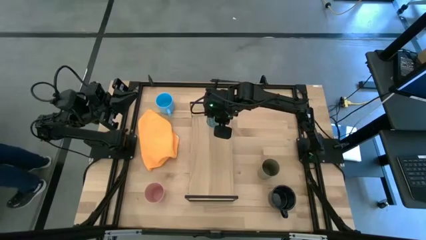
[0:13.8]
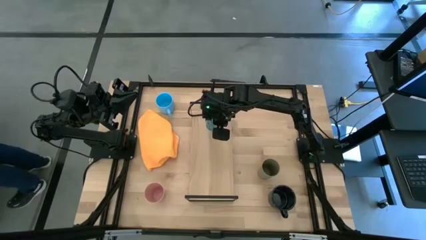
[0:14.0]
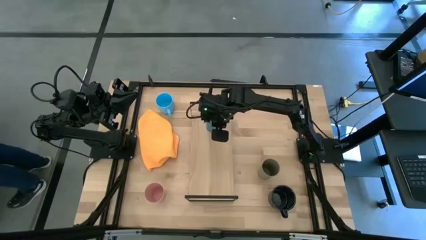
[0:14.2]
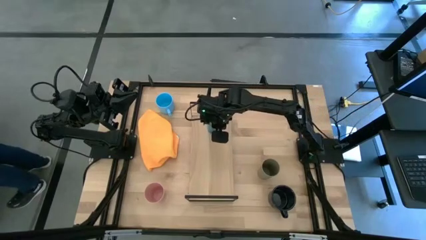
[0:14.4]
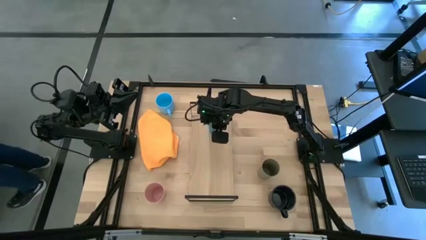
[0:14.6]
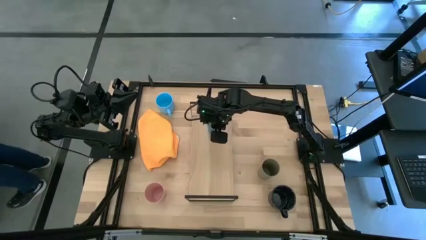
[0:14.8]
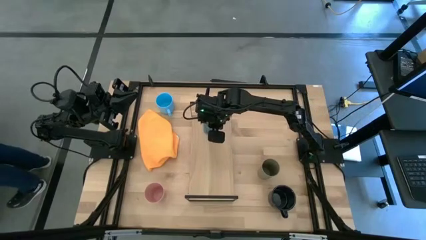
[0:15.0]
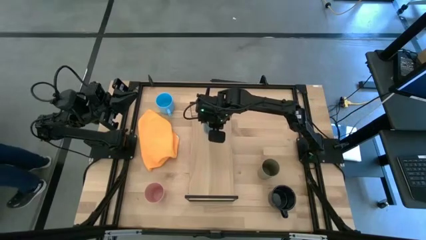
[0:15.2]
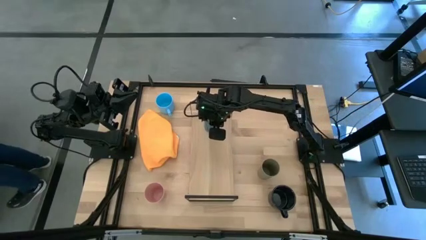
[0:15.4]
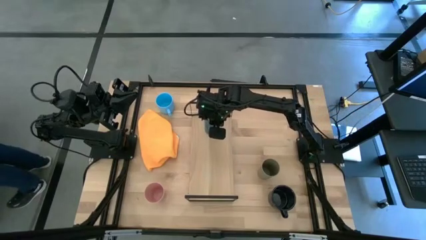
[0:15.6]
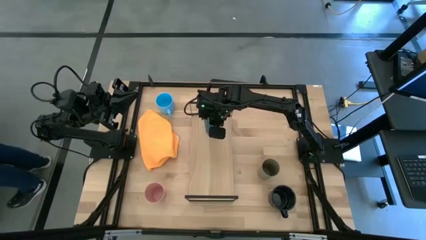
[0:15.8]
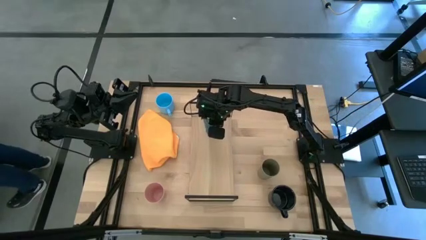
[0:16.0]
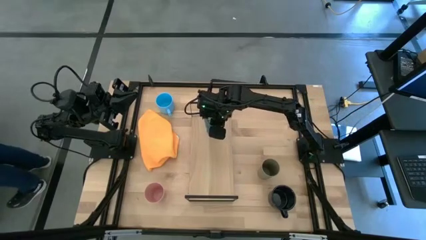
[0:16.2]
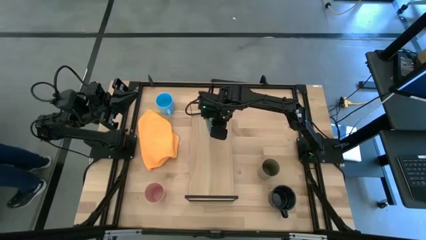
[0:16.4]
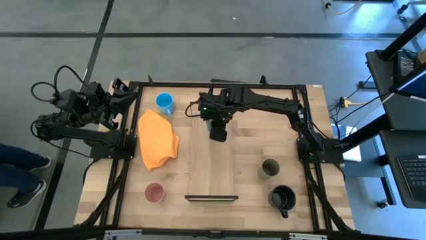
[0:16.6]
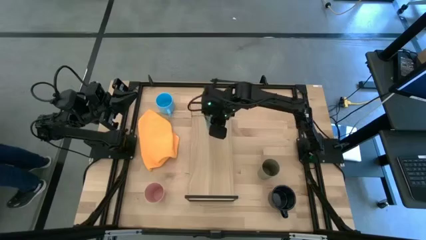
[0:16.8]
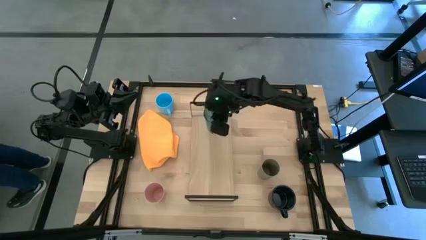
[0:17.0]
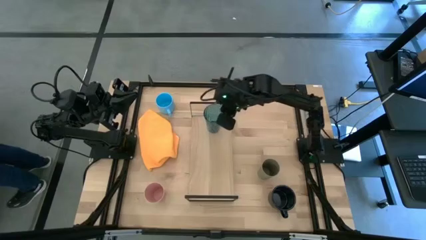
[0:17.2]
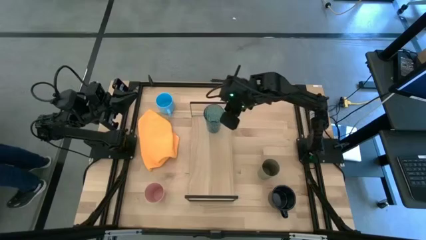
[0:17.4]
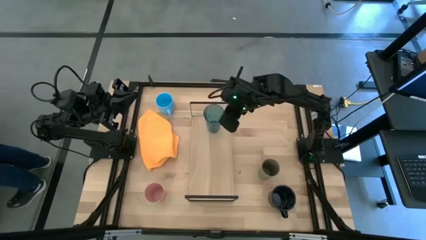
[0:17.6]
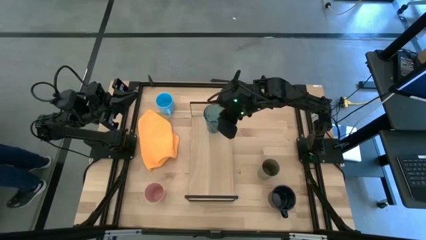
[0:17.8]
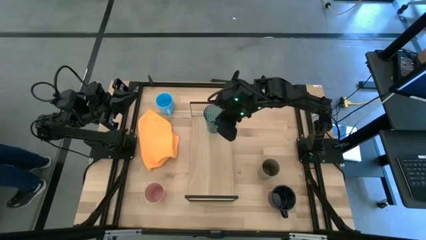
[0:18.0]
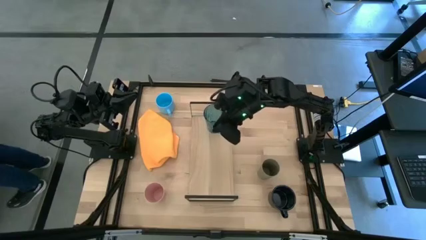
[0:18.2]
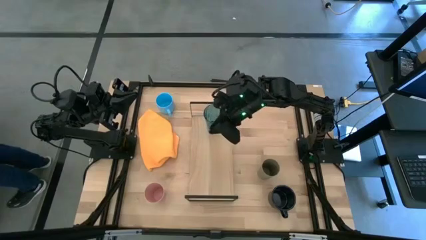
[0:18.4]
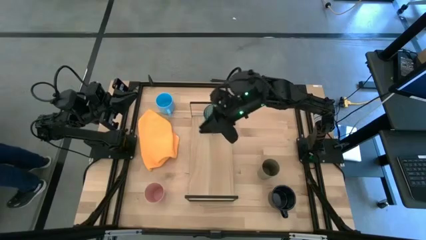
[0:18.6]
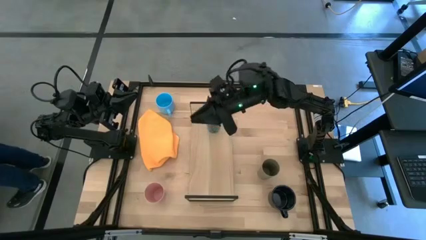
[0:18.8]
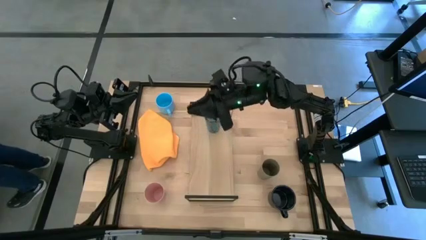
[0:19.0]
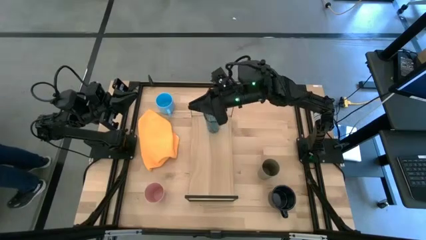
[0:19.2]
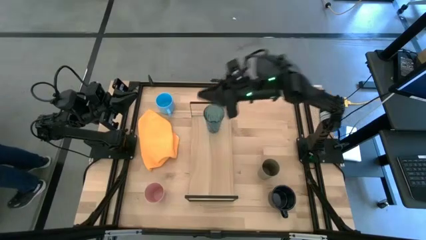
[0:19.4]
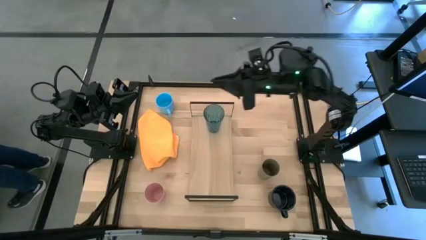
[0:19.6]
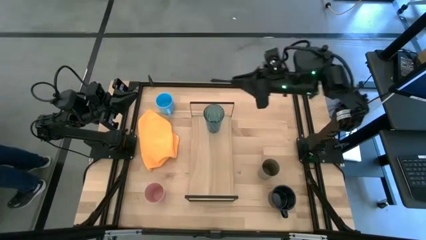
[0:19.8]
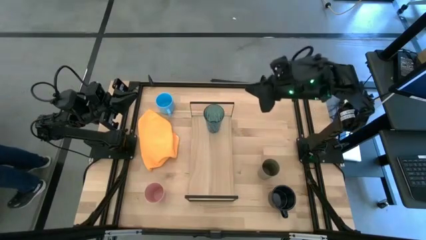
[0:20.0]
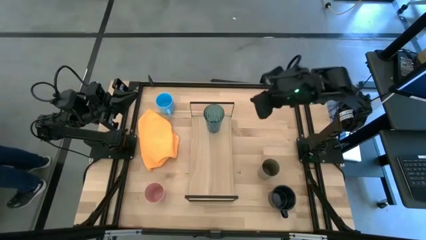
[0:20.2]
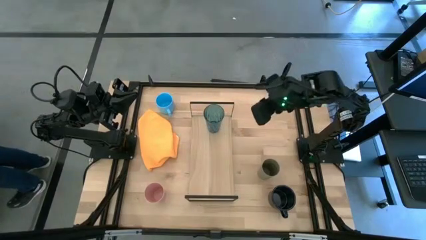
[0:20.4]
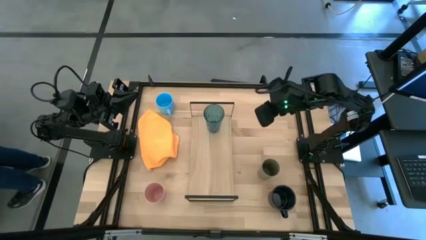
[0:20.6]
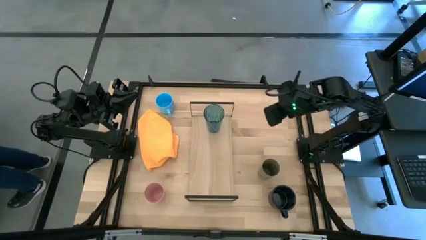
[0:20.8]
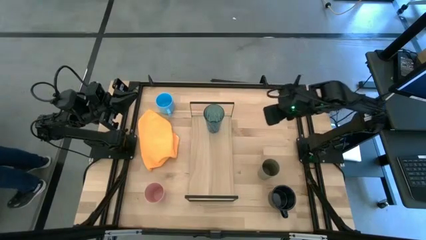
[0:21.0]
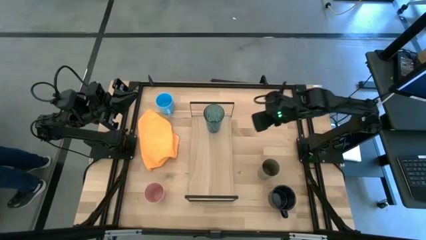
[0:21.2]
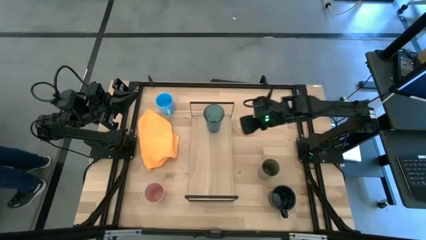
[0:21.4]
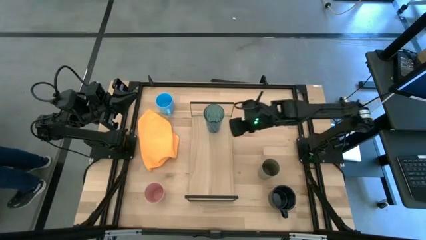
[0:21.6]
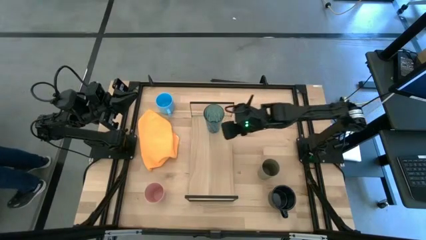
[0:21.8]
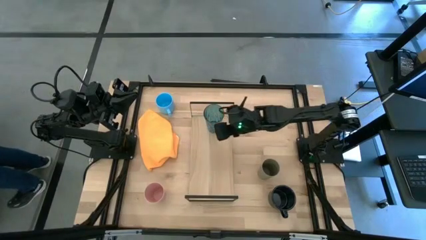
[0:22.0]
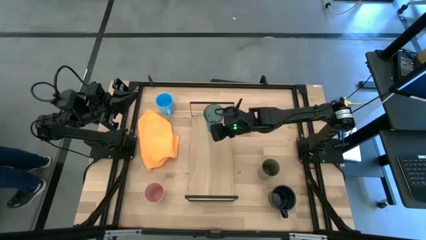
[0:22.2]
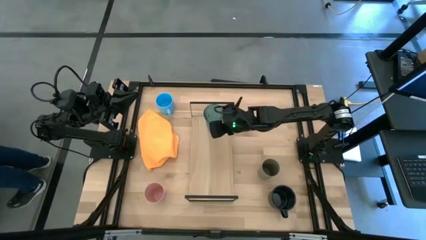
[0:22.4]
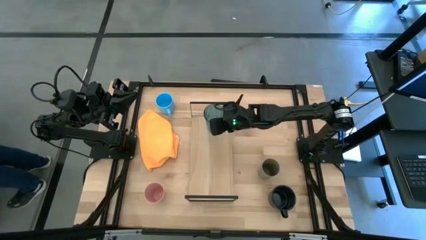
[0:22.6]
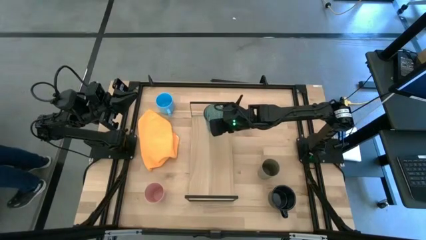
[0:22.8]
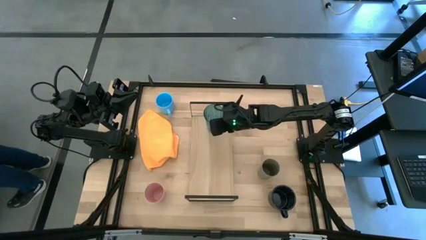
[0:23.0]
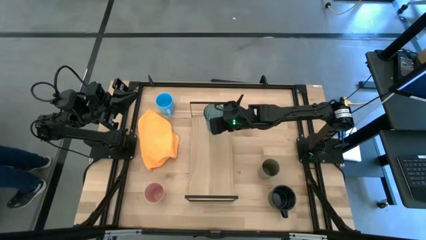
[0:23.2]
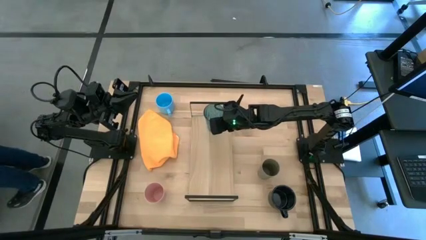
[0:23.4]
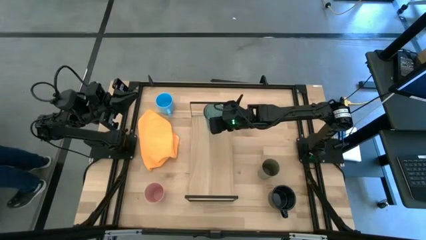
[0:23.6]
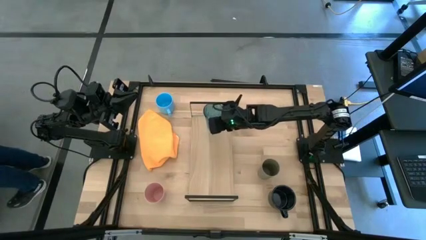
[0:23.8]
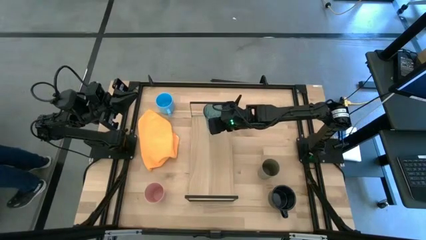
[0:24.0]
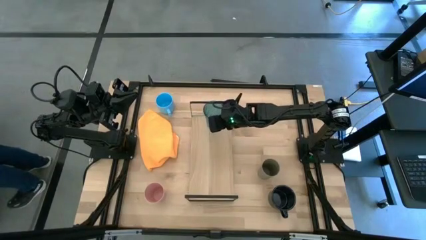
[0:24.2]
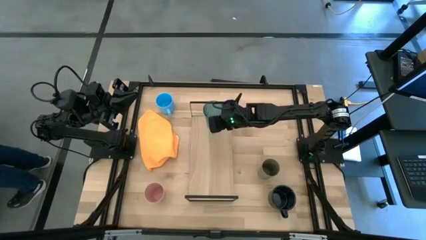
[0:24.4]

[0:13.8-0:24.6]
Task: Stack small to large cups/mugs on shelf
Put the blue cup on the shelf

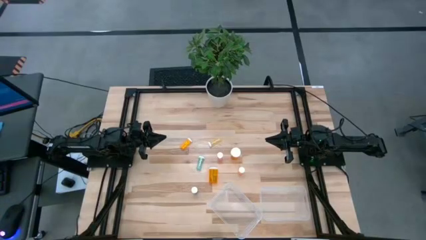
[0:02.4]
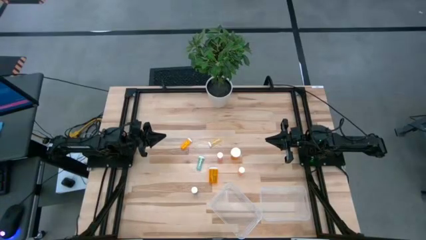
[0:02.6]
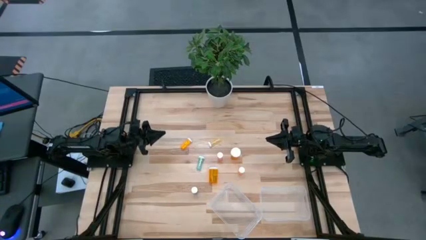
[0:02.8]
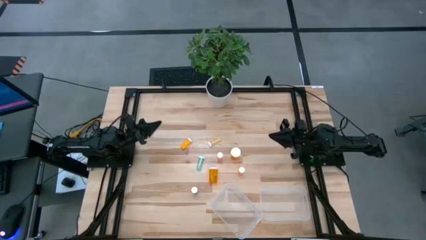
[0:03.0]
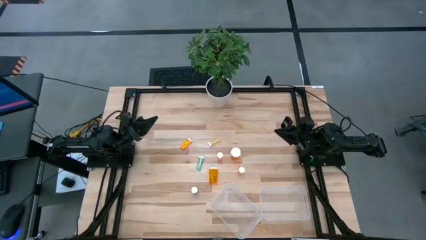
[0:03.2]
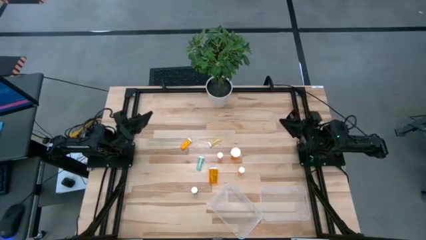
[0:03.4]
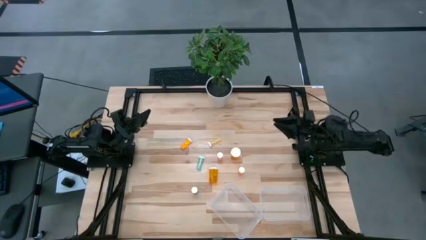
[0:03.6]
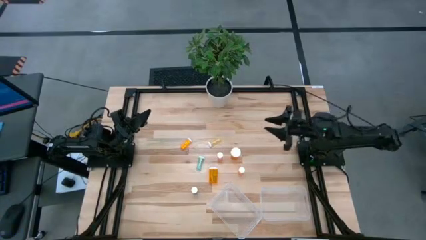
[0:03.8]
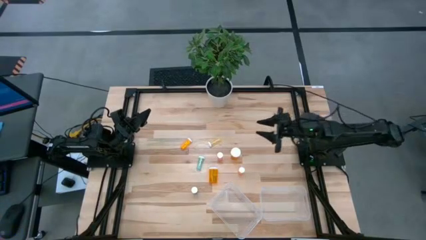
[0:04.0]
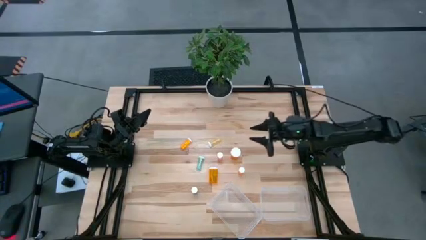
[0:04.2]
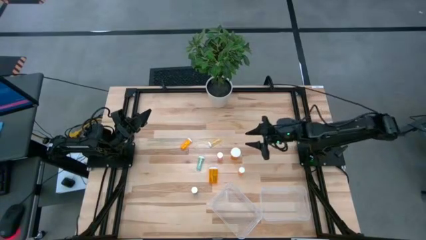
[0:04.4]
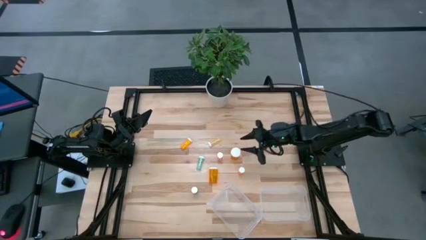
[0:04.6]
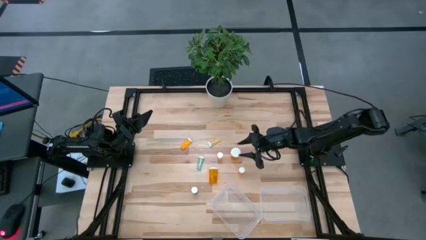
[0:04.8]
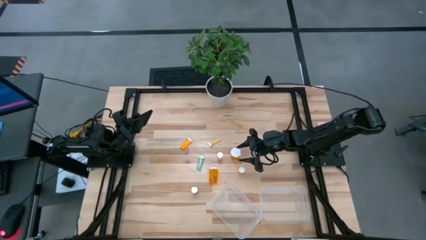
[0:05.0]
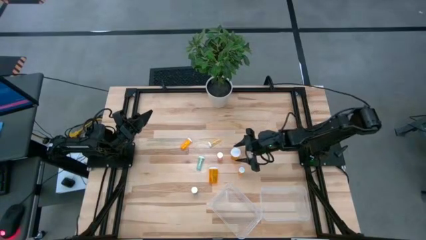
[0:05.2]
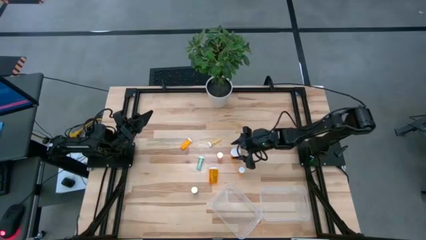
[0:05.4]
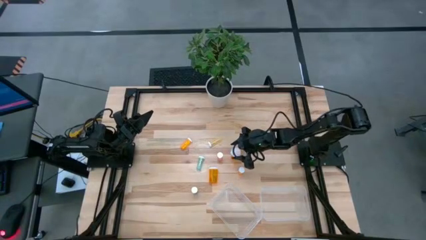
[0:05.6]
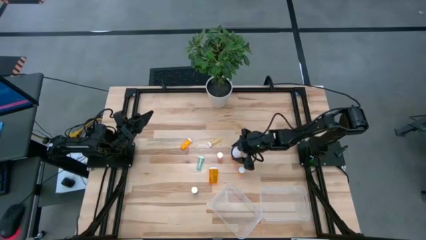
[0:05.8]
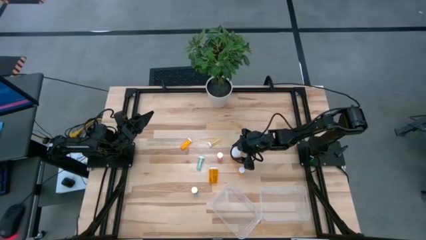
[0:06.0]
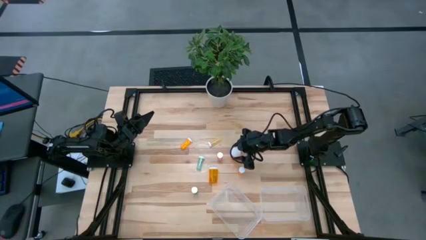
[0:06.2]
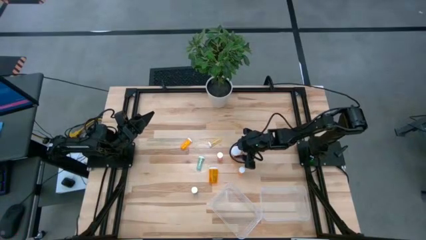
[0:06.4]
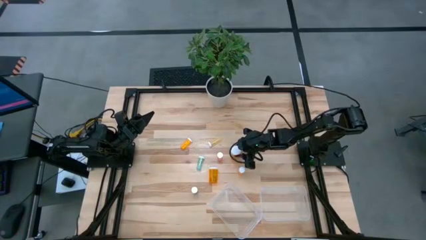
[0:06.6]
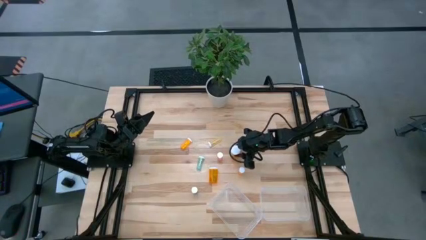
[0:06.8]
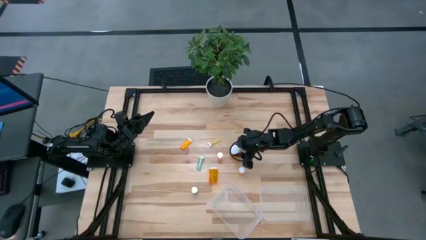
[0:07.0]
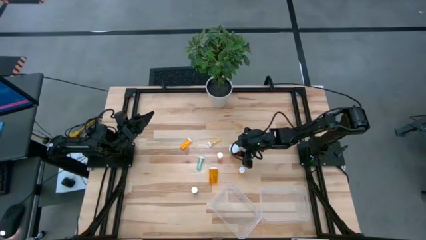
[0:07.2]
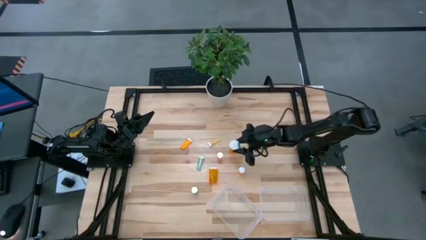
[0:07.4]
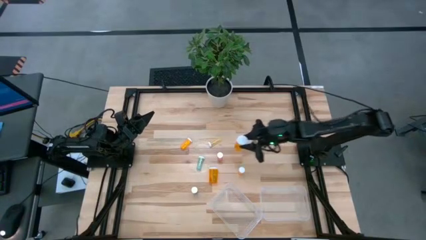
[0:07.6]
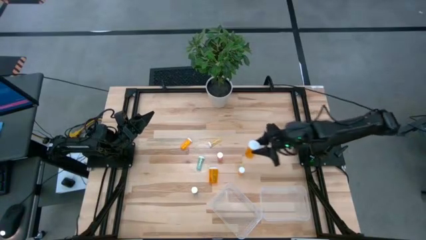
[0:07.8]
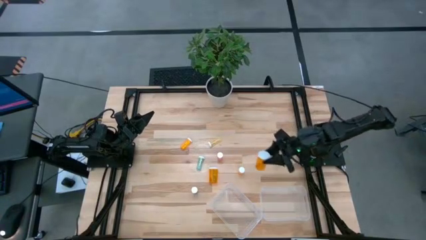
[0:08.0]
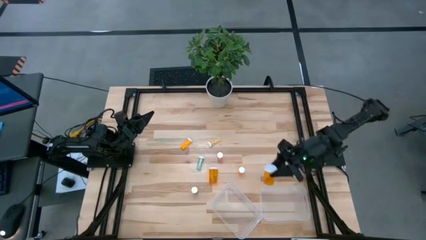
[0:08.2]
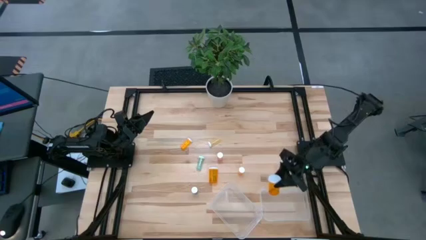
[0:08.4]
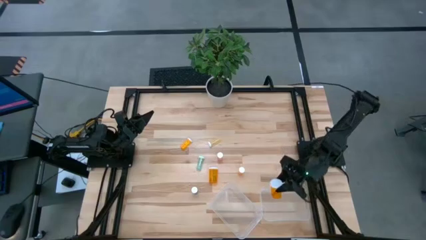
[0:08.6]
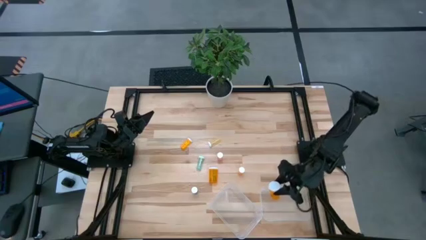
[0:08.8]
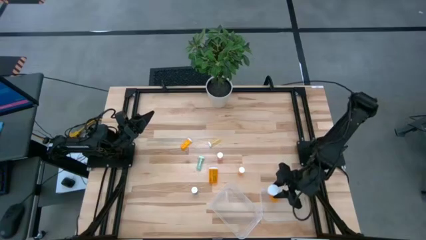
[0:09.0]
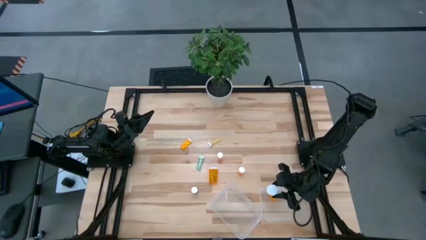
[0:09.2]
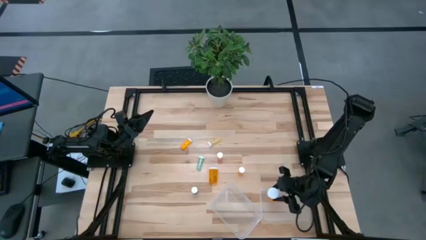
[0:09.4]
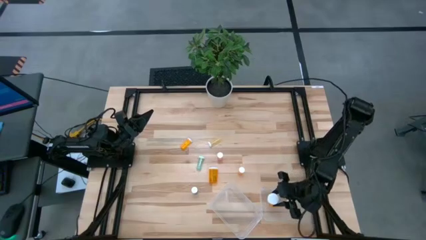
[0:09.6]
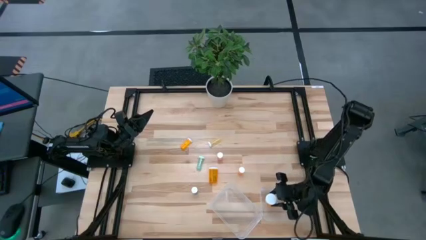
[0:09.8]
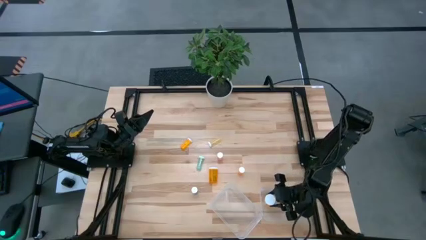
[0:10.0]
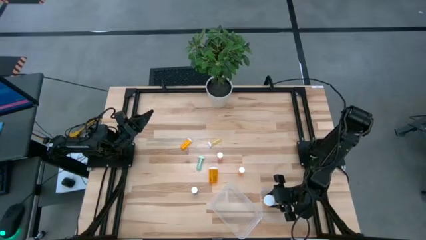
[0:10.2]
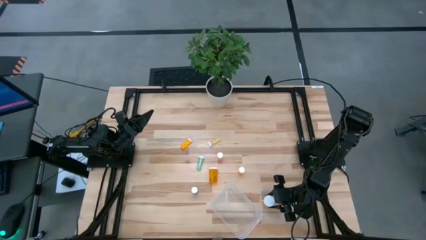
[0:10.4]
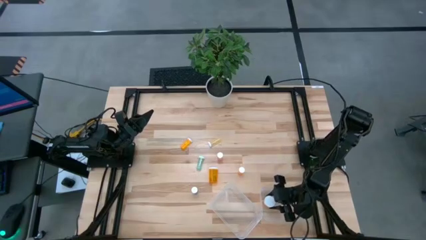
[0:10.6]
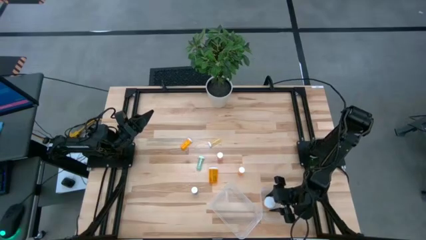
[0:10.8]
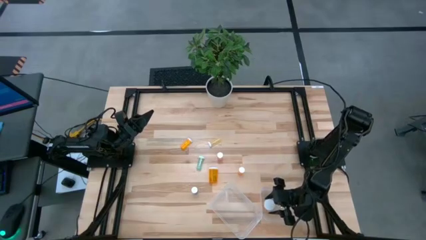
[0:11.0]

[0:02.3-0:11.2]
Task: Pick and place medicine bottles into bin by pill shape (circle, oval)
Put the top big orange pill bottle into the right transparent bin
